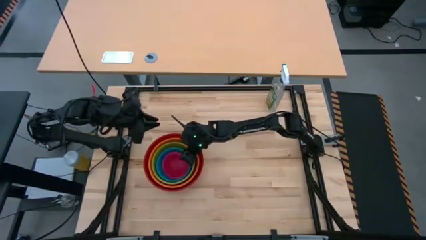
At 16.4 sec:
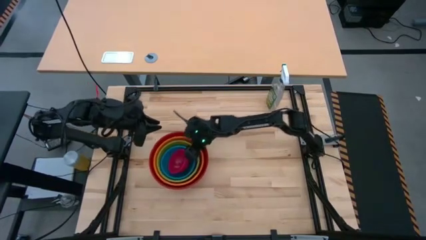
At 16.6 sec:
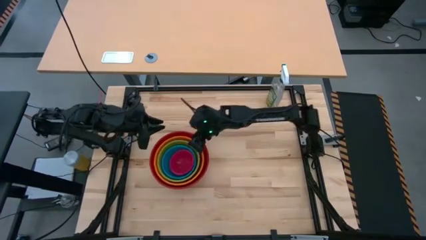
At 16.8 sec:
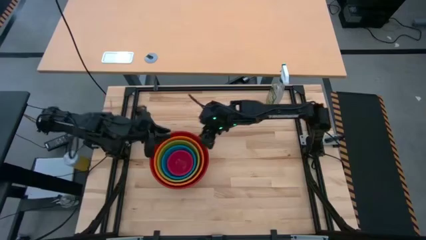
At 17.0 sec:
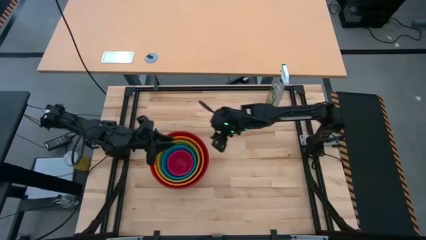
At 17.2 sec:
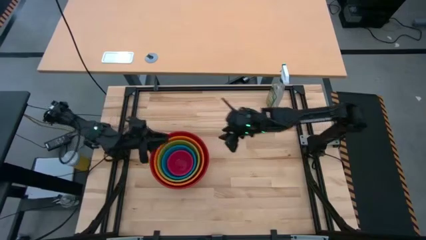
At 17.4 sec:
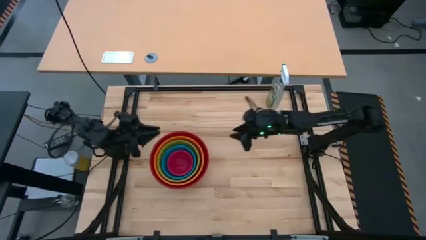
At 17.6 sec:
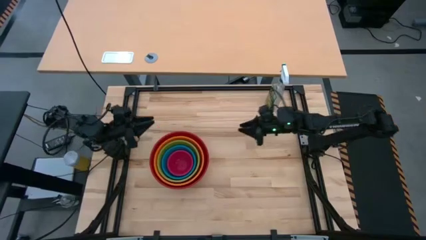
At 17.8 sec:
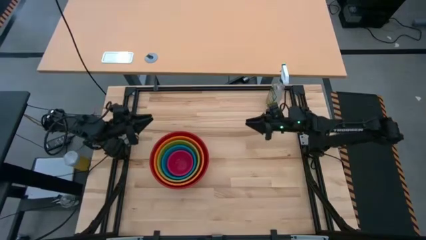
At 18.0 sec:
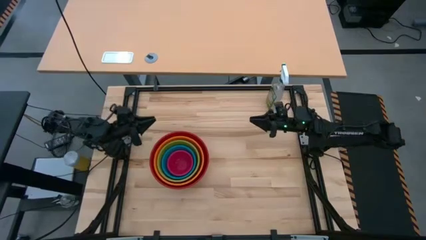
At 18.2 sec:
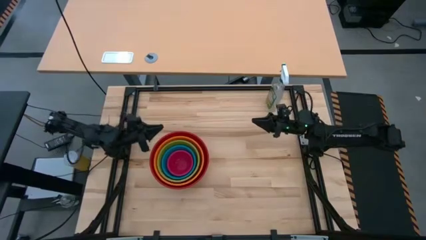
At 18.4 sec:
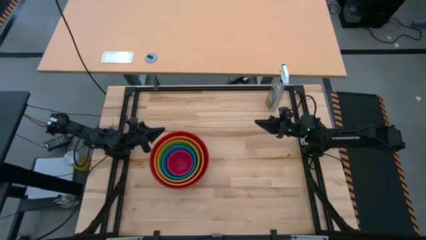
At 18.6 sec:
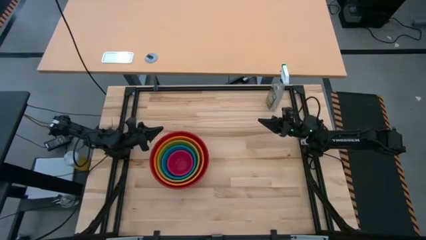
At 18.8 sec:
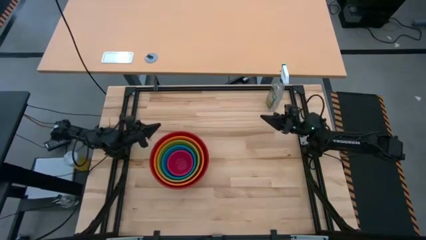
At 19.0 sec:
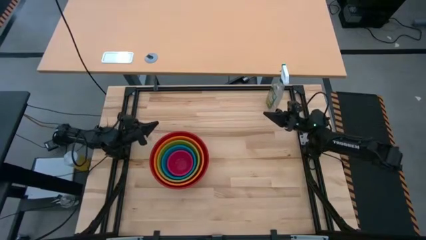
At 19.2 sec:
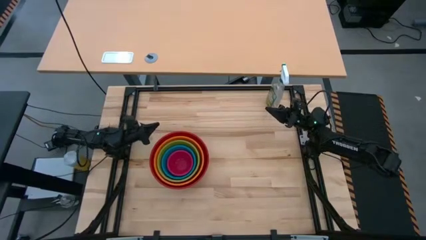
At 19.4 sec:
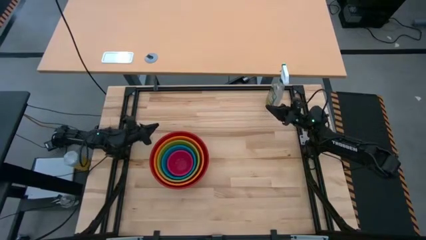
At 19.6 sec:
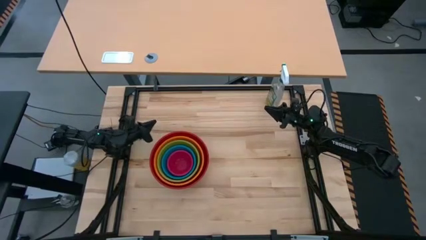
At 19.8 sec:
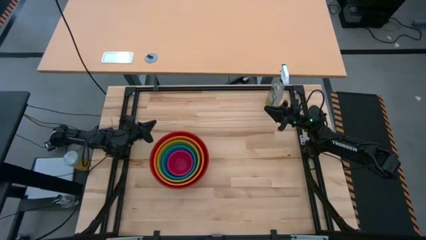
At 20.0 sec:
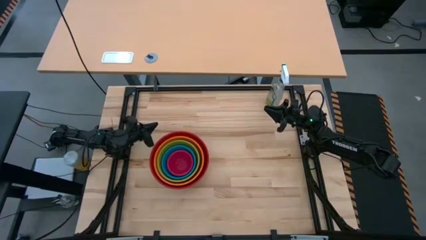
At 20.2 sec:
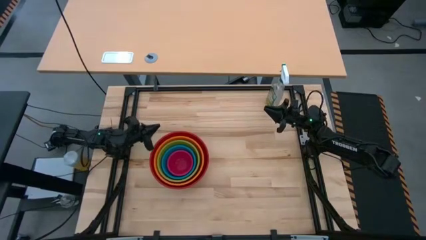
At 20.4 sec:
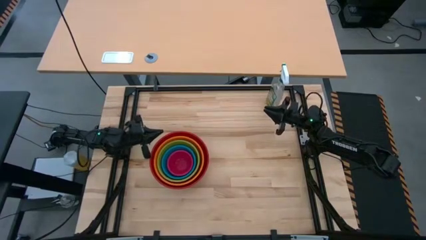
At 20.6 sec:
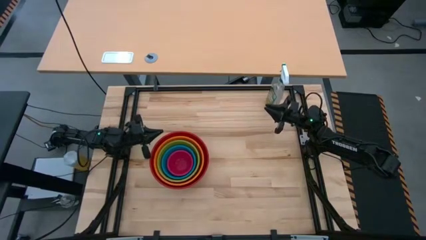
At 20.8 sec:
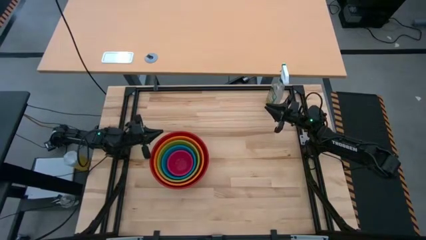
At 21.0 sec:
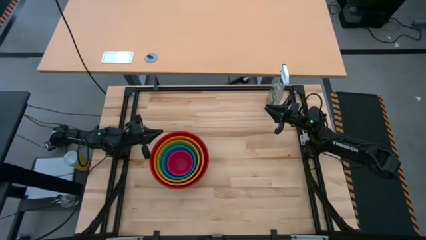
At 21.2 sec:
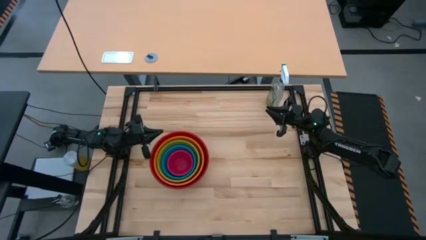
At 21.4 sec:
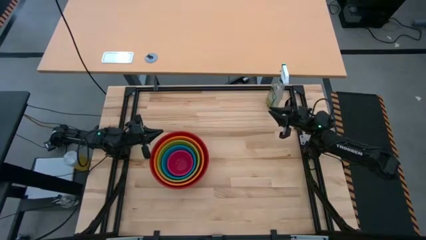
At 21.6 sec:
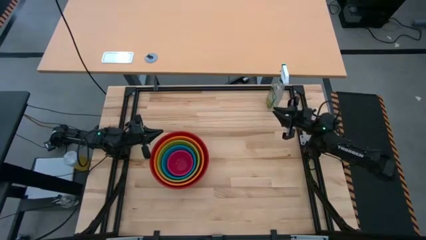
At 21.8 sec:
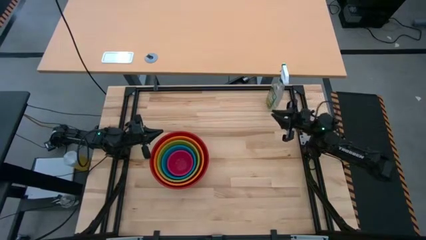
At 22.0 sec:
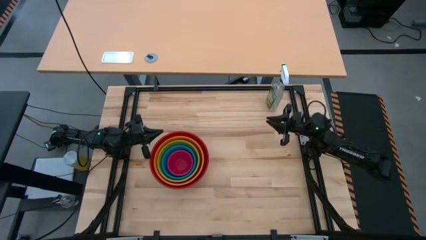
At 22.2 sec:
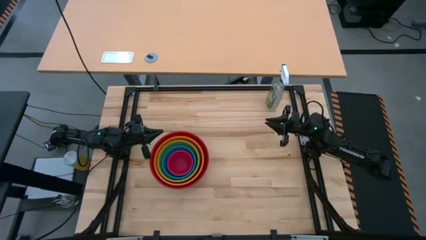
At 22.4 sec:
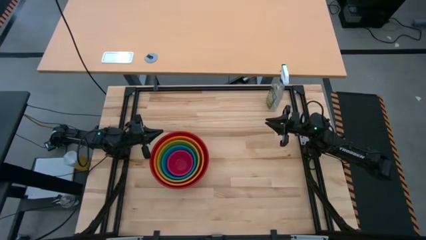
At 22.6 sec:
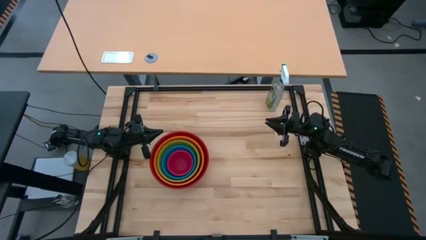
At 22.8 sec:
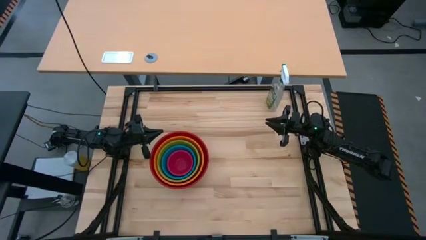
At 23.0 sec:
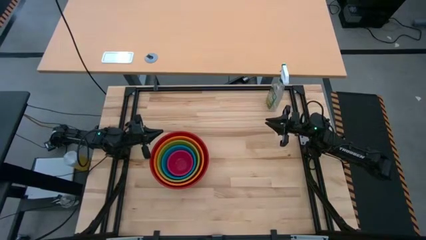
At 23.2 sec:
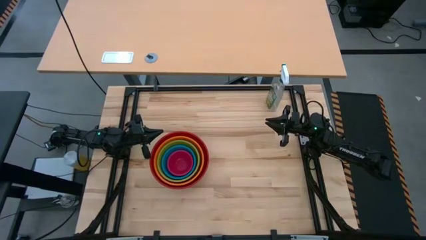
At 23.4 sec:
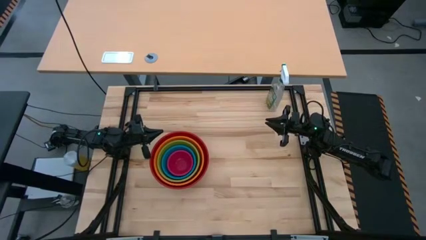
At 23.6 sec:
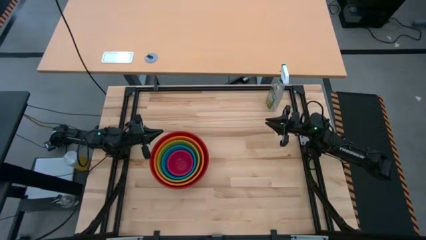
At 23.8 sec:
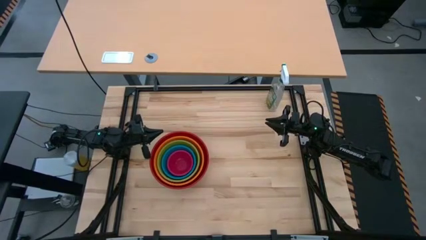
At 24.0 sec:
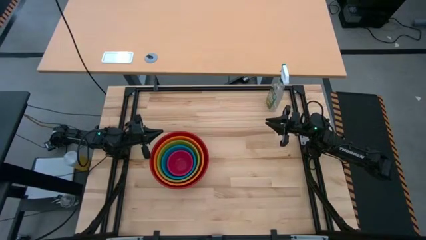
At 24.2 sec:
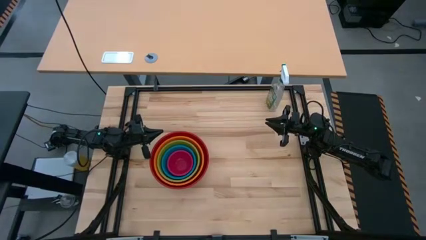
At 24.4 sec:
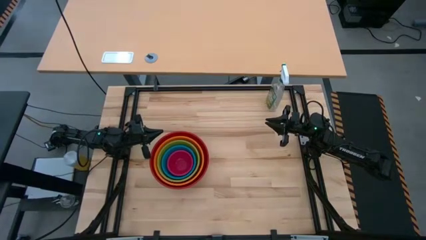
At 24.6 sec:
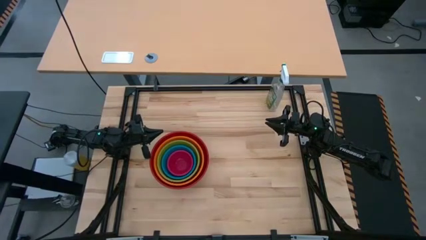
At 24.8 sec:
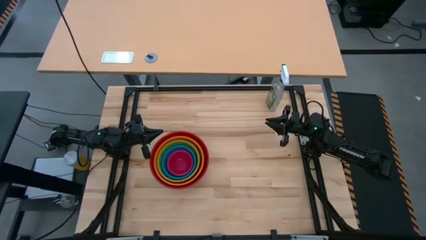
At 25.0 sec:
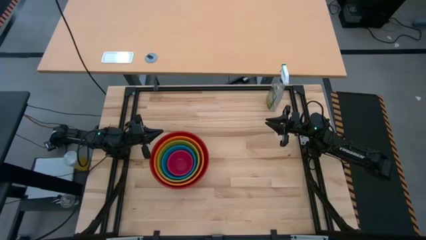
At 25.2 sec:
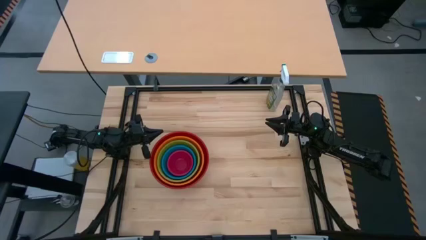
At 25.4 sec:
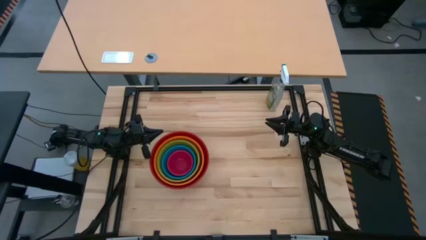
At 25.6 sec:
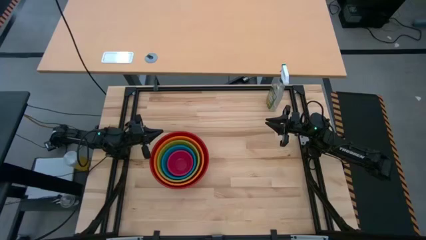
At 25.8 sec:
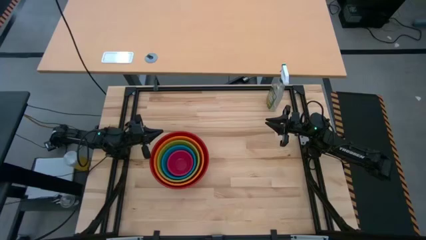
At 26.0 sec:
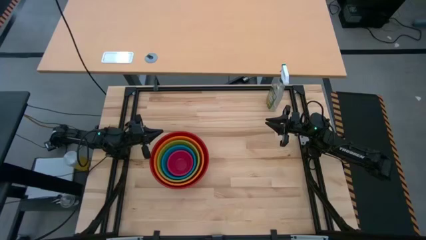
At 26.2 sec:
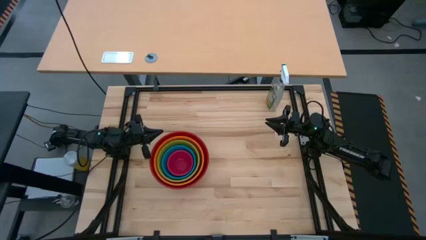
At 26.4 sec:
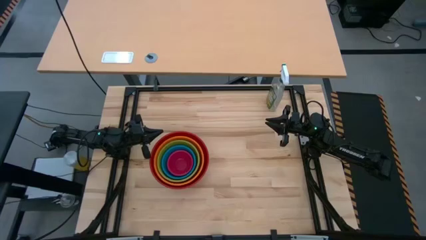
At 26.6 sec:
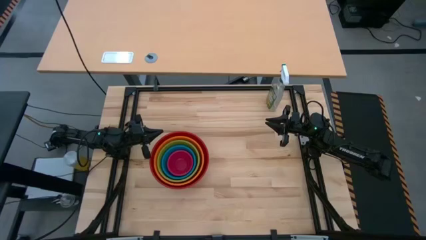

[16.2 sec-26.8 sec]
Return to Home Position

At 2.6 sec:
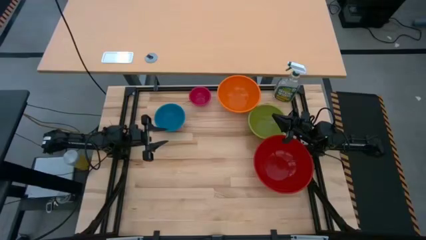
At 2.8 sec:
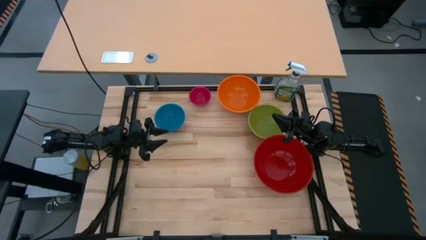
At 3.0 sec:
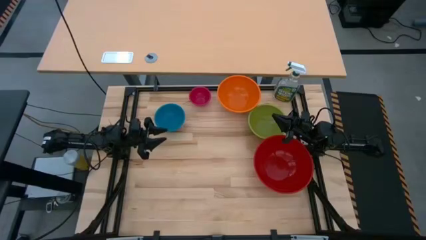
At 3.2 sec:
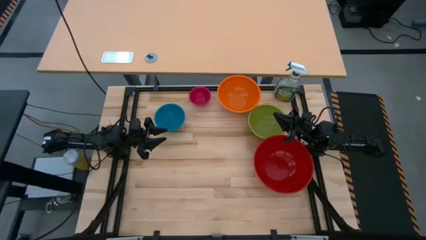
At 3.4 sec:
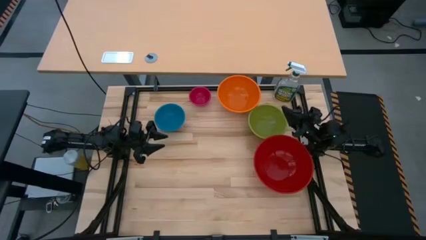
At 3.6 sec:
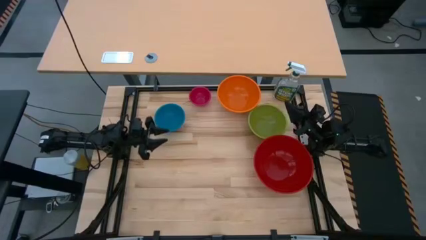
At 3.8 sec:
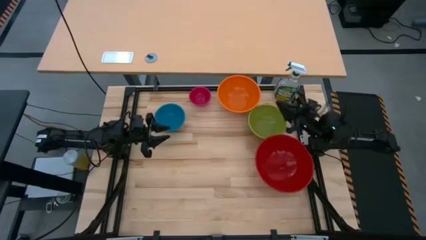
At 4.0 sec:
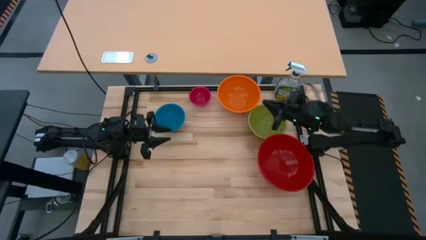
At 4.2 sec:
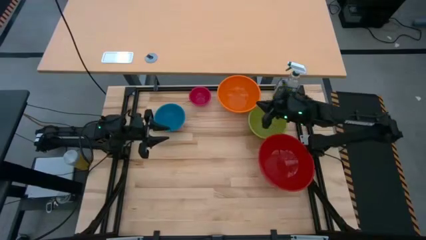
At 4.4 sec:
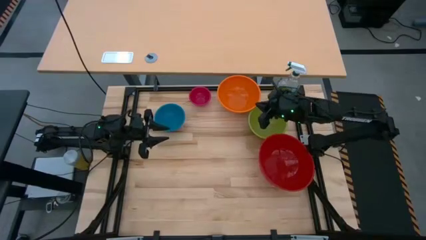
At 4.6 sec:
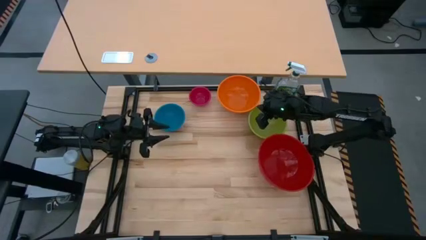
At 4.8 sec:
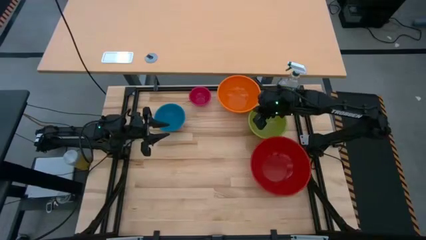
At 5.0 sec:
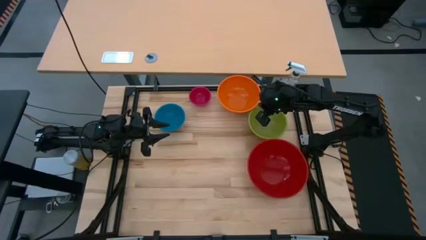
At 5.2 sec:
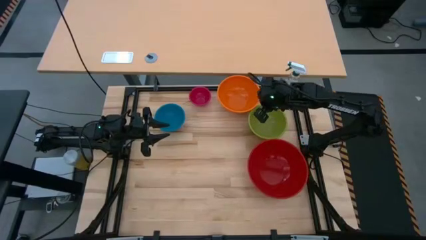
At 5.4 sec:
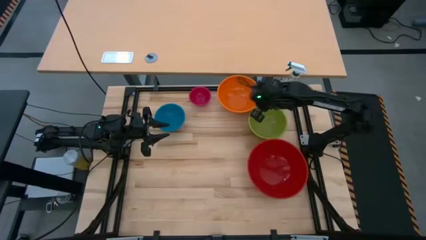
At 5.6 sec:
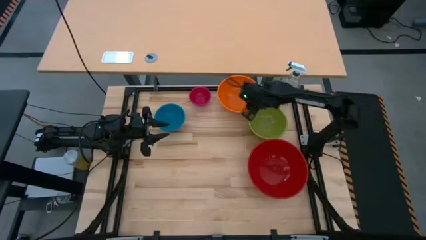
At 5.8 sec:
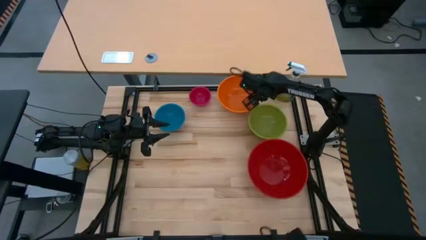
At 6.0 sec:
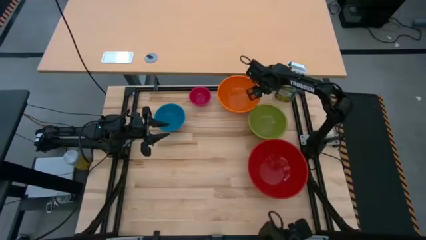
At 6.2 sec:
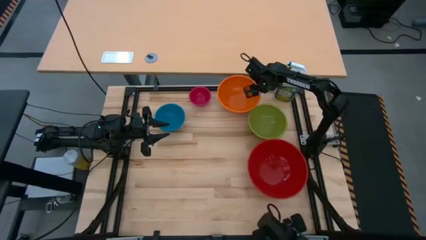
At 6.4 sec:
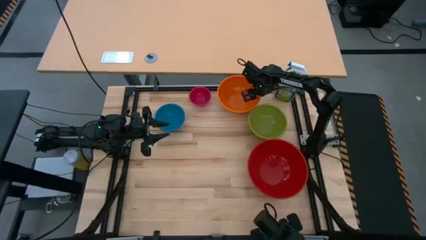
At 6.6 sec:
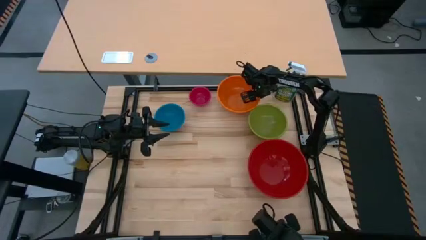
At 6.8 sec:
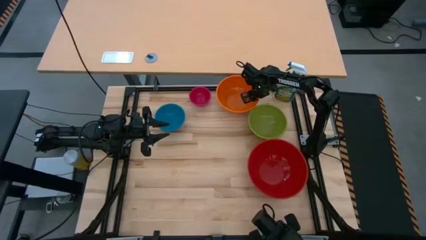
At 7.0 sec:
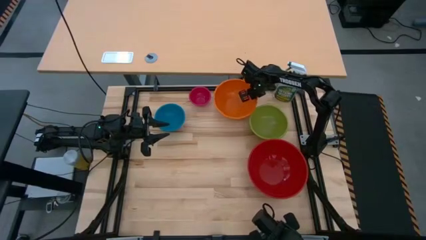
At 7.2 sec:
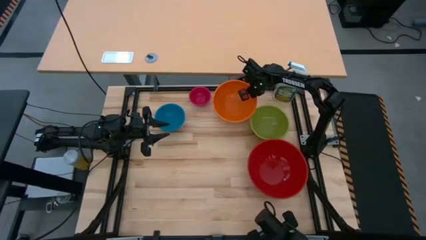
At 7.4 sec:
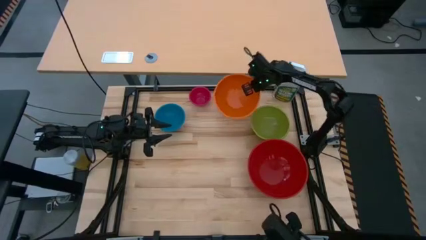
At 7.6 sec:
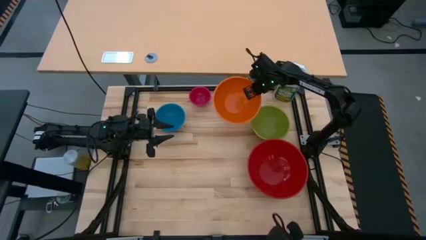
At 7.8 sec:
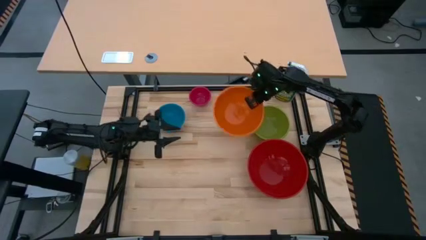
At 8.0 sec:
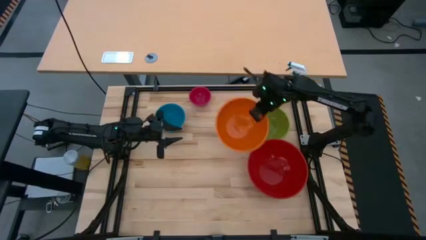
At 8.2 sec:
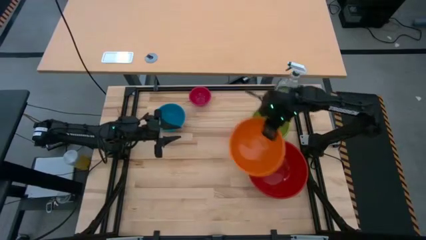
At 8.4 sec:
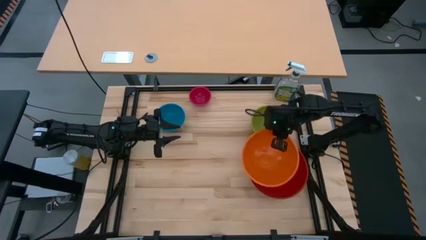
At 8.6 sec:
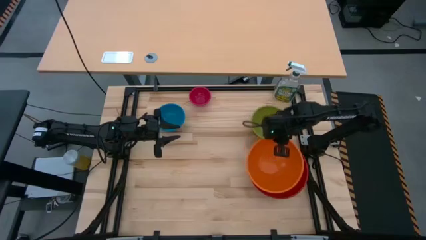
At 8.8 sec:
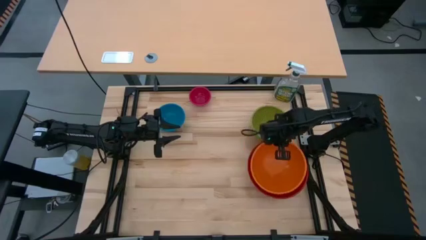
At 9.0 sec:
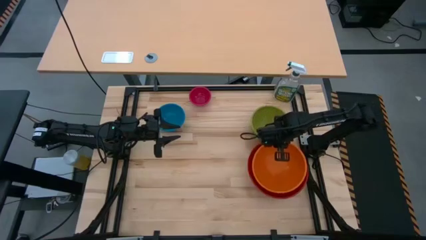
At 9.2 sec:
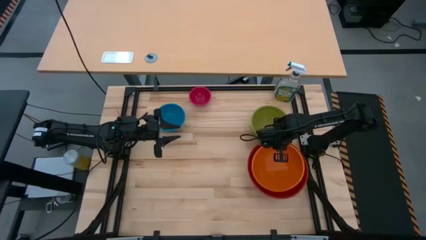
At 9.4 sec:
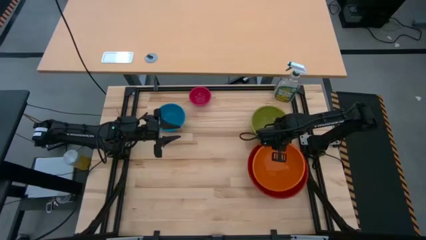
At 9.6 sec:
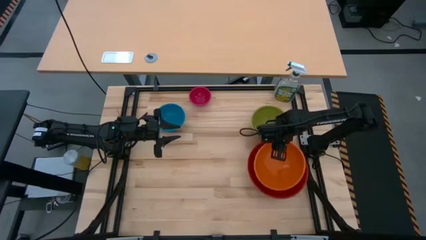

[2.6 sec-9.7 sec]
Stack the orange bowl on the red bowl
